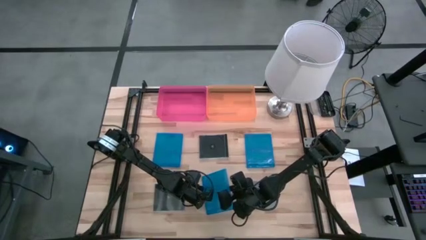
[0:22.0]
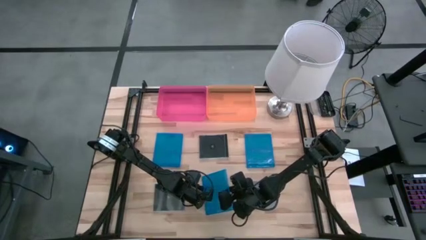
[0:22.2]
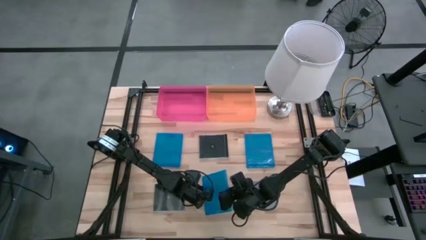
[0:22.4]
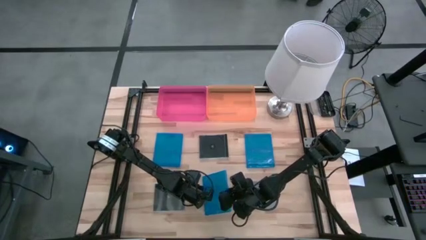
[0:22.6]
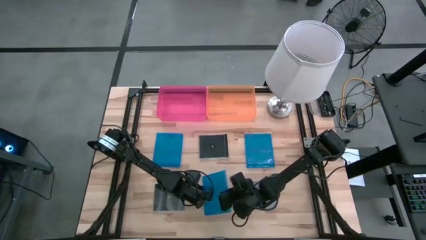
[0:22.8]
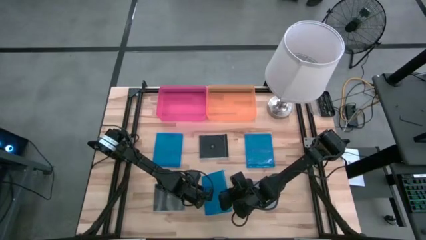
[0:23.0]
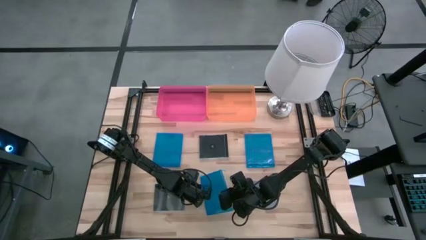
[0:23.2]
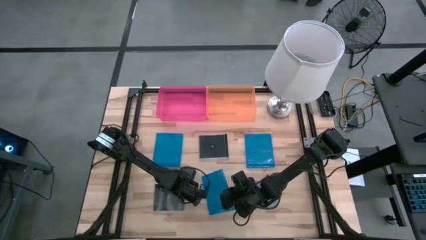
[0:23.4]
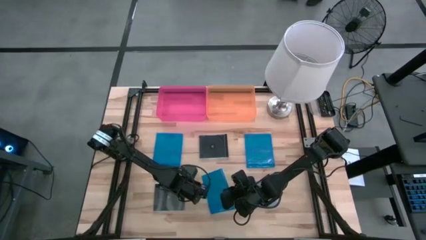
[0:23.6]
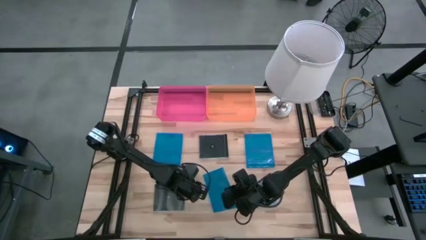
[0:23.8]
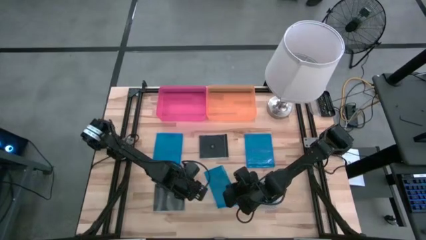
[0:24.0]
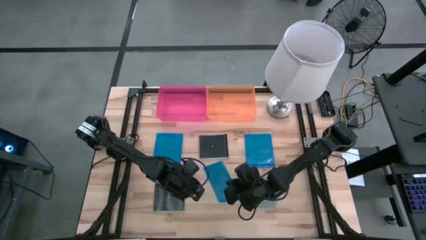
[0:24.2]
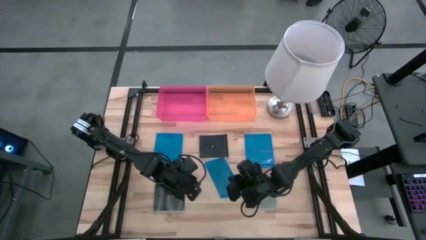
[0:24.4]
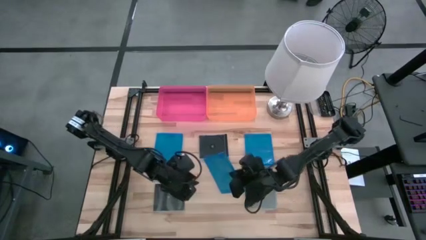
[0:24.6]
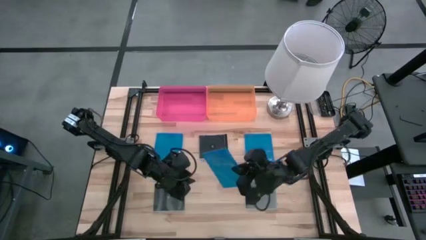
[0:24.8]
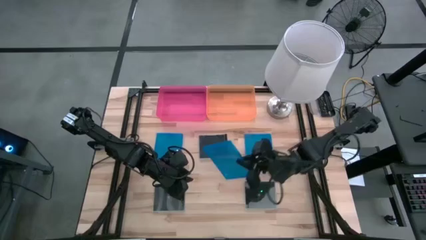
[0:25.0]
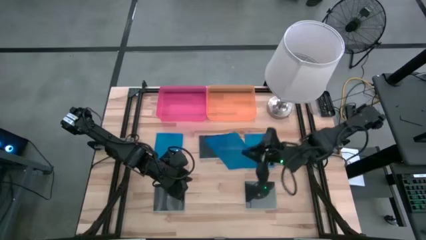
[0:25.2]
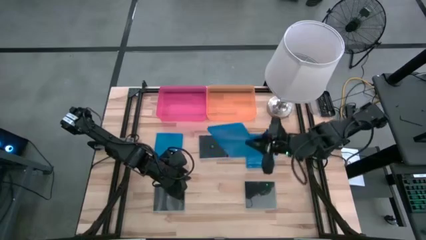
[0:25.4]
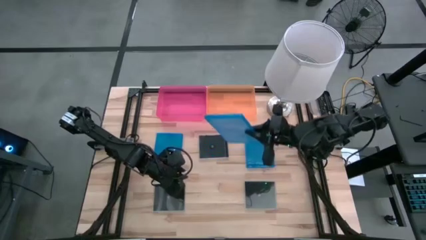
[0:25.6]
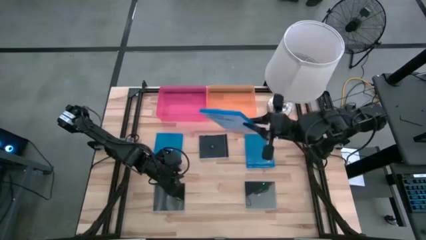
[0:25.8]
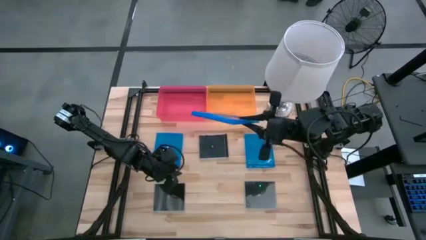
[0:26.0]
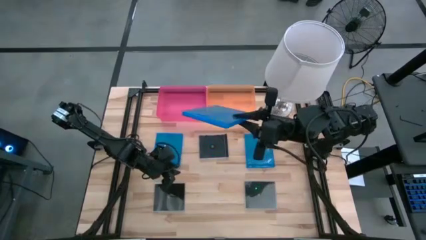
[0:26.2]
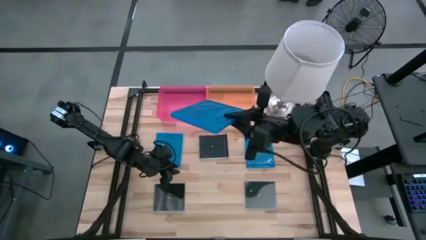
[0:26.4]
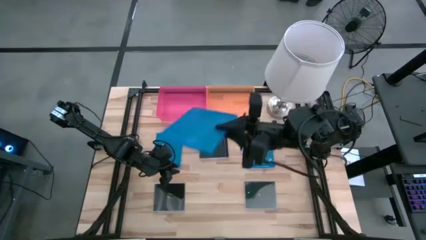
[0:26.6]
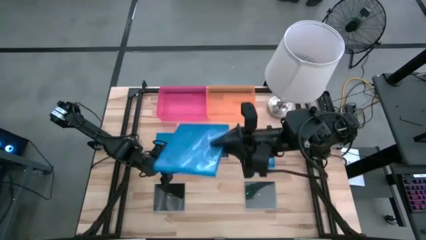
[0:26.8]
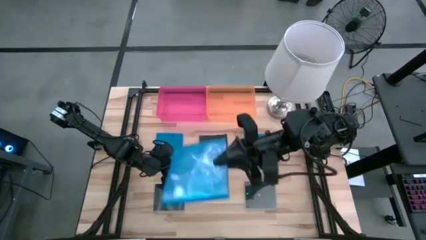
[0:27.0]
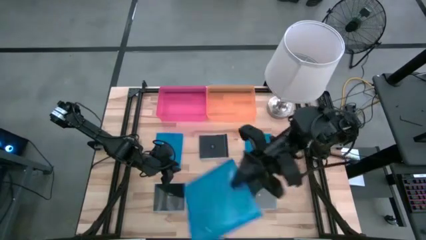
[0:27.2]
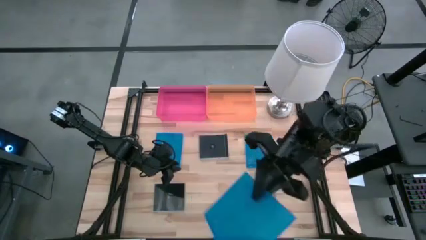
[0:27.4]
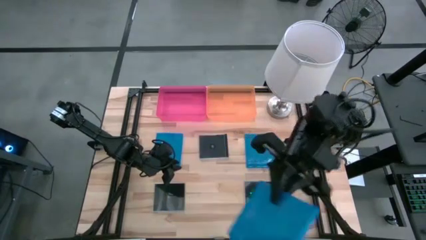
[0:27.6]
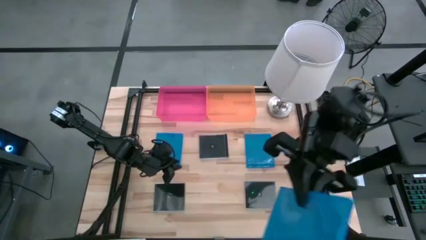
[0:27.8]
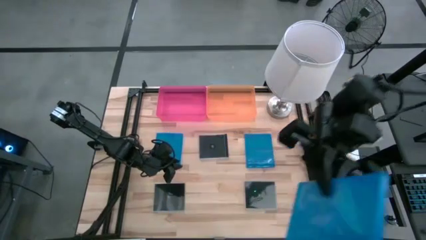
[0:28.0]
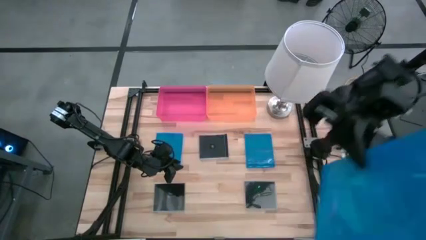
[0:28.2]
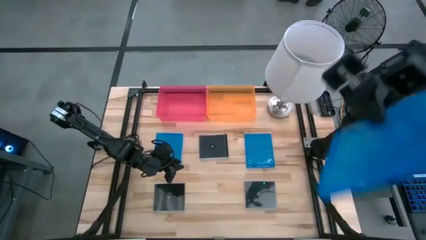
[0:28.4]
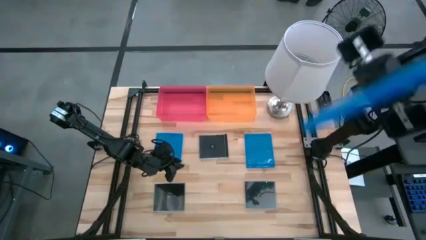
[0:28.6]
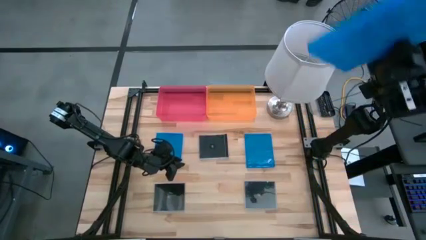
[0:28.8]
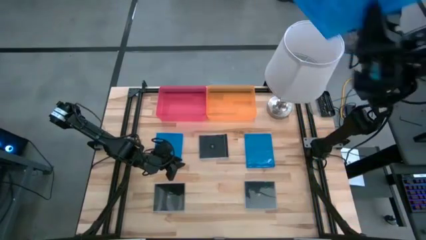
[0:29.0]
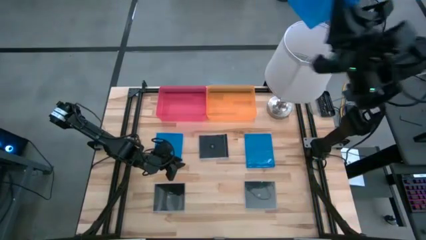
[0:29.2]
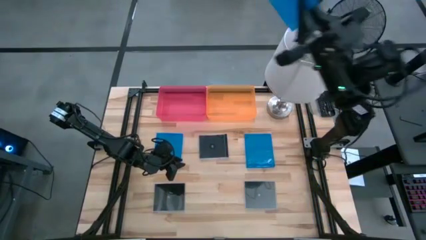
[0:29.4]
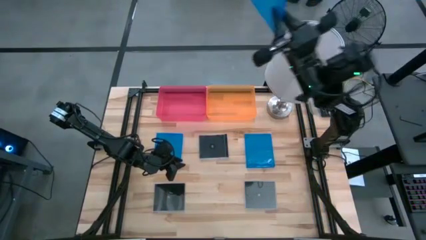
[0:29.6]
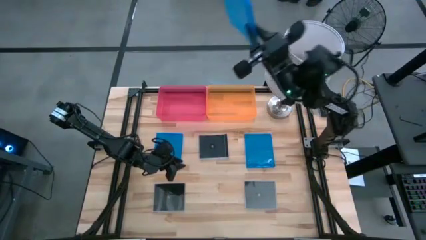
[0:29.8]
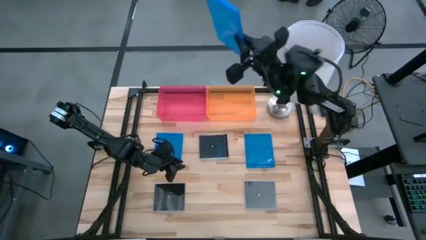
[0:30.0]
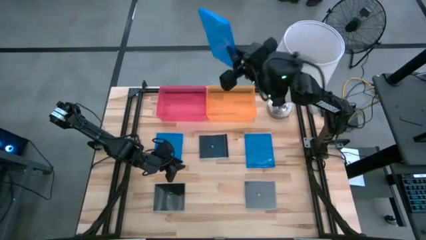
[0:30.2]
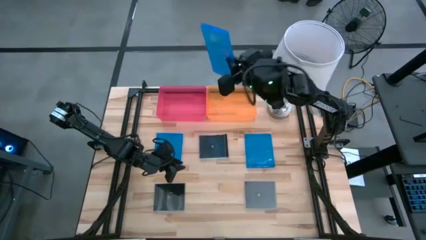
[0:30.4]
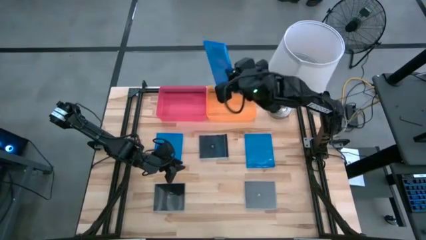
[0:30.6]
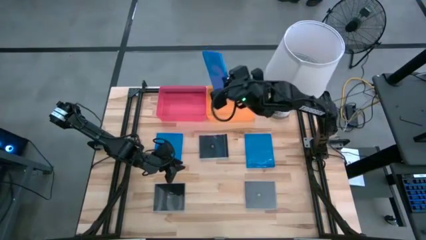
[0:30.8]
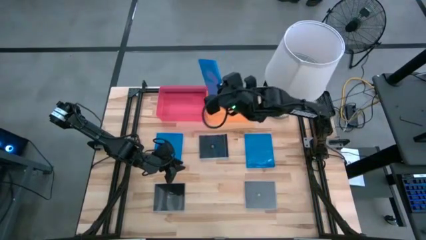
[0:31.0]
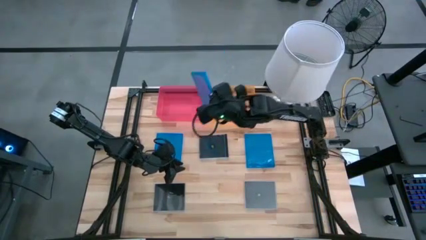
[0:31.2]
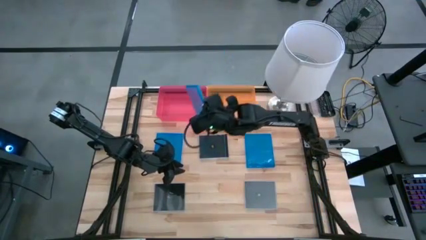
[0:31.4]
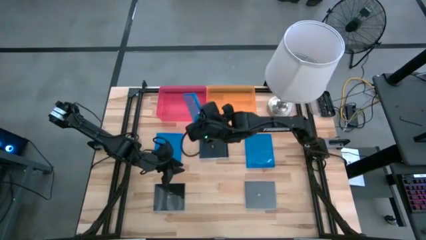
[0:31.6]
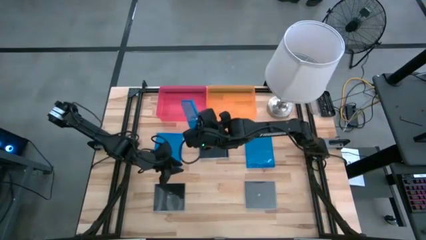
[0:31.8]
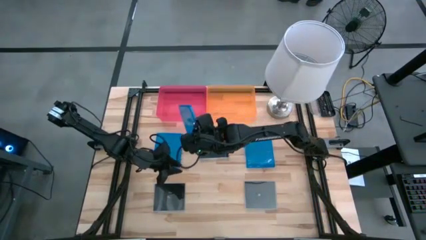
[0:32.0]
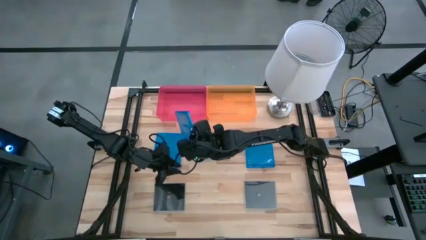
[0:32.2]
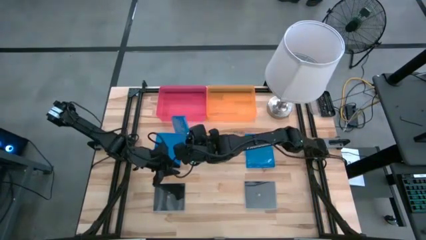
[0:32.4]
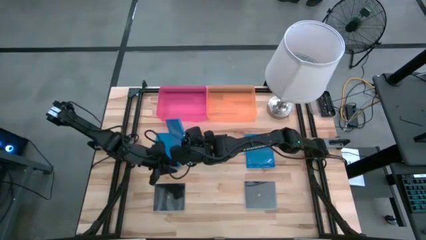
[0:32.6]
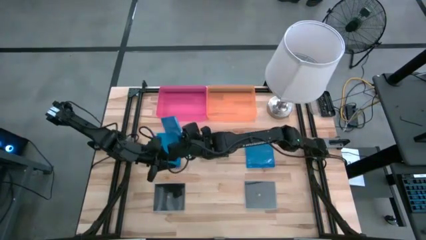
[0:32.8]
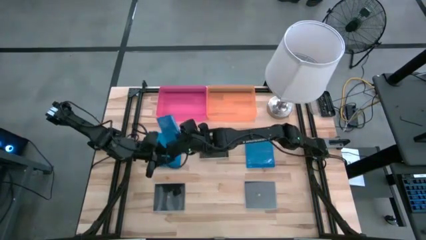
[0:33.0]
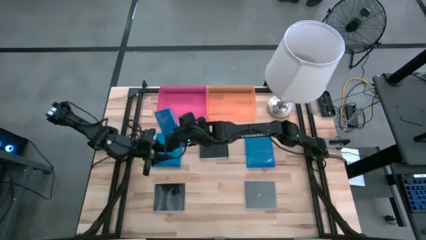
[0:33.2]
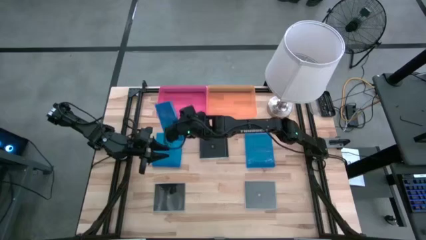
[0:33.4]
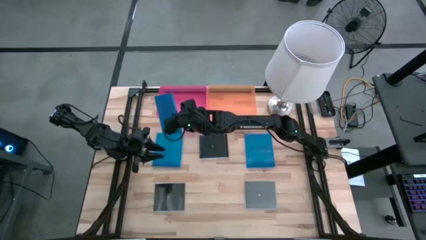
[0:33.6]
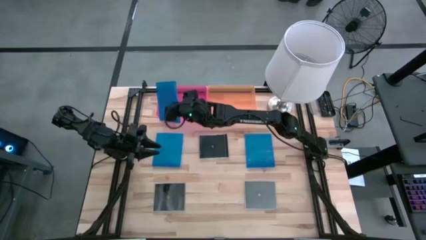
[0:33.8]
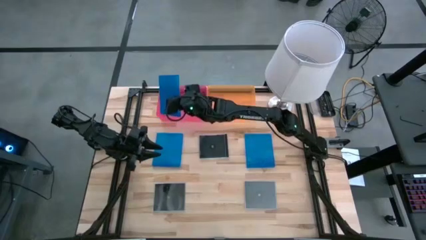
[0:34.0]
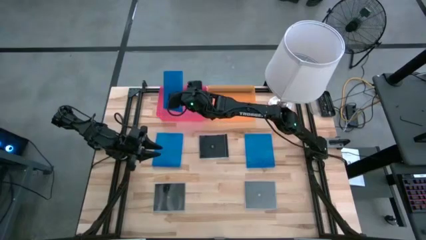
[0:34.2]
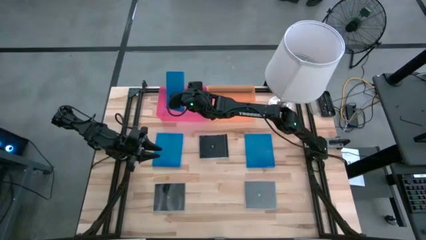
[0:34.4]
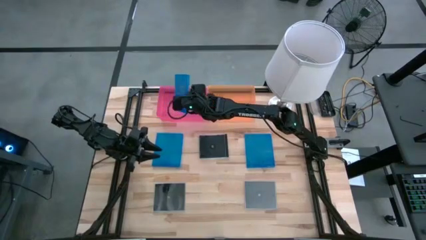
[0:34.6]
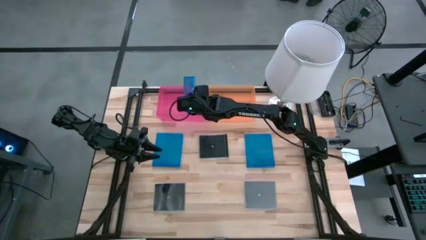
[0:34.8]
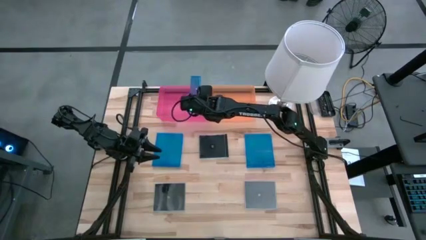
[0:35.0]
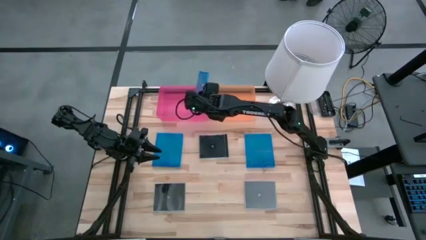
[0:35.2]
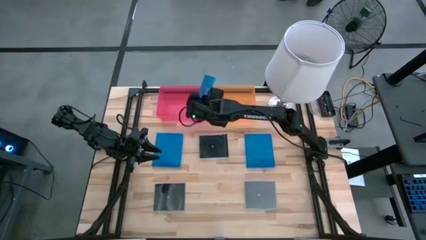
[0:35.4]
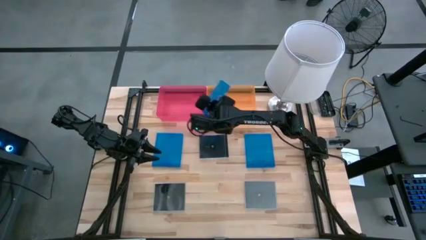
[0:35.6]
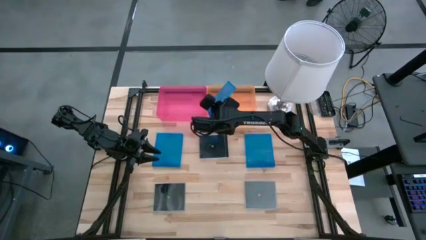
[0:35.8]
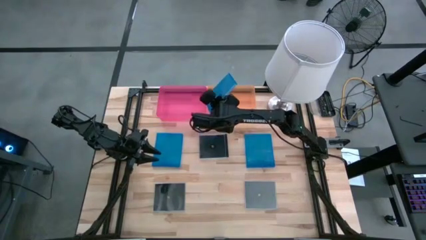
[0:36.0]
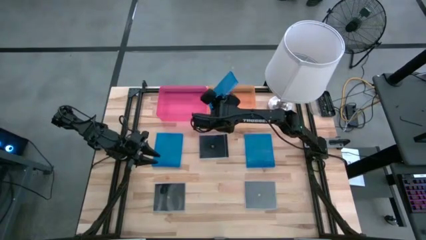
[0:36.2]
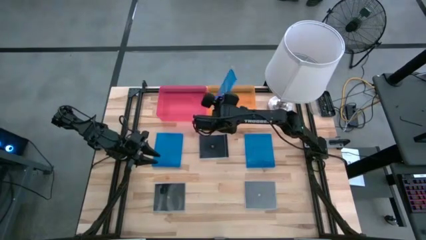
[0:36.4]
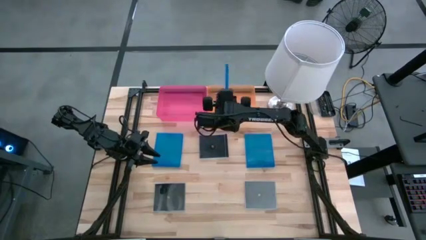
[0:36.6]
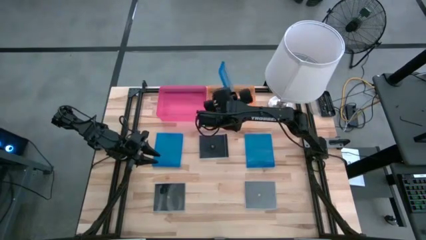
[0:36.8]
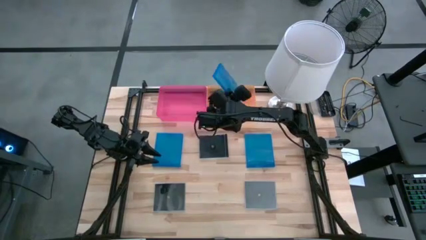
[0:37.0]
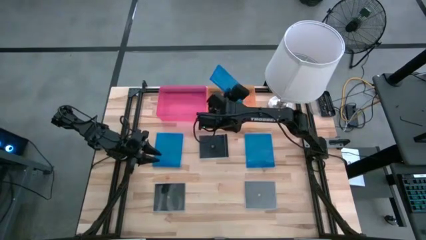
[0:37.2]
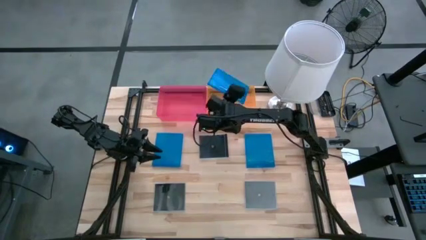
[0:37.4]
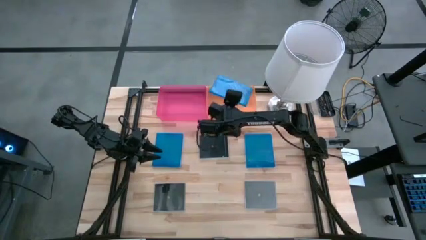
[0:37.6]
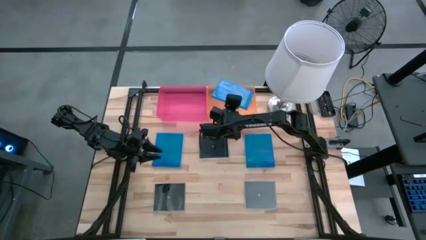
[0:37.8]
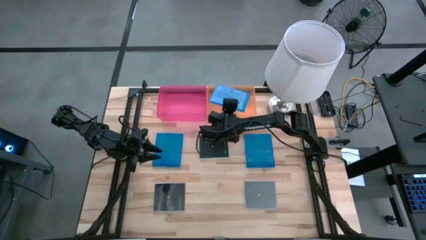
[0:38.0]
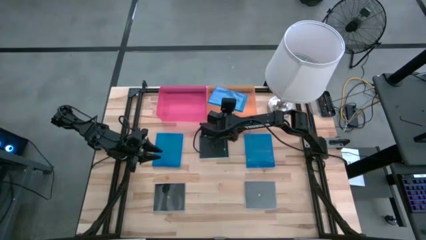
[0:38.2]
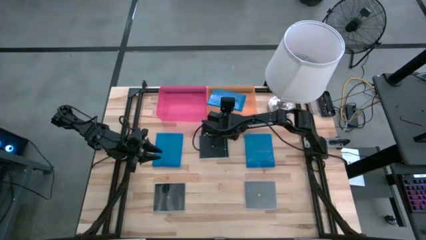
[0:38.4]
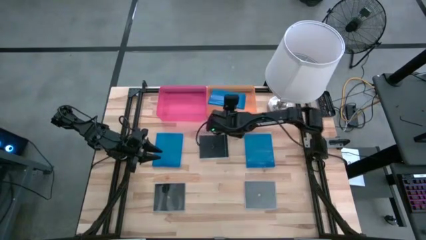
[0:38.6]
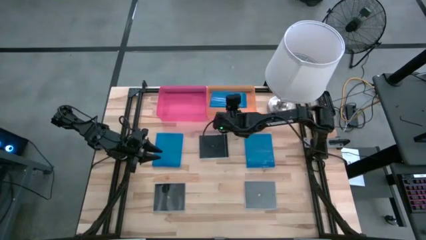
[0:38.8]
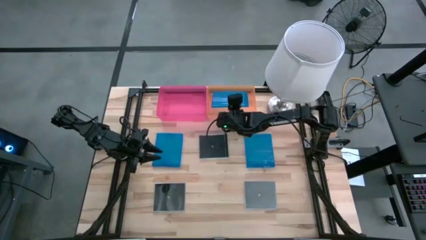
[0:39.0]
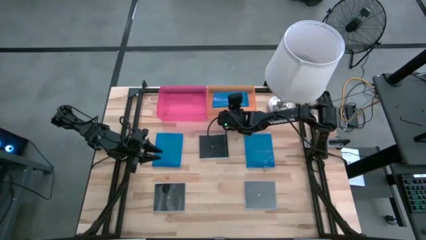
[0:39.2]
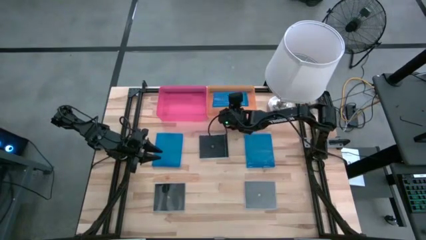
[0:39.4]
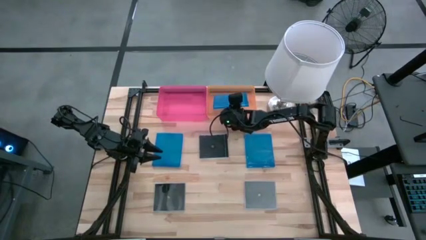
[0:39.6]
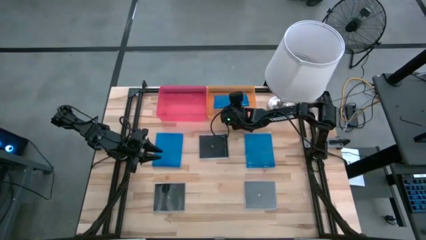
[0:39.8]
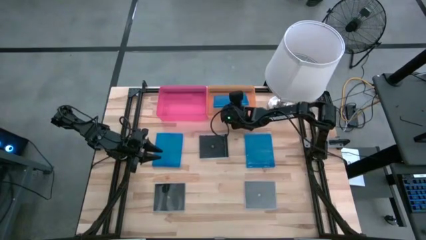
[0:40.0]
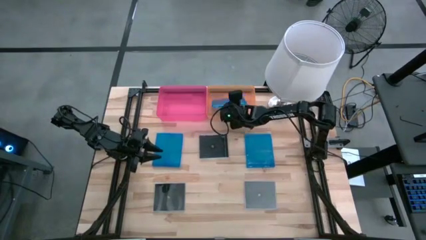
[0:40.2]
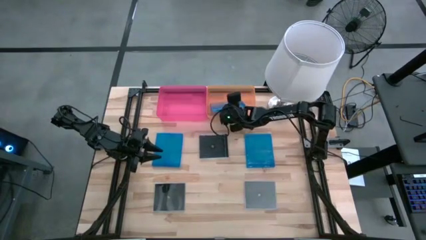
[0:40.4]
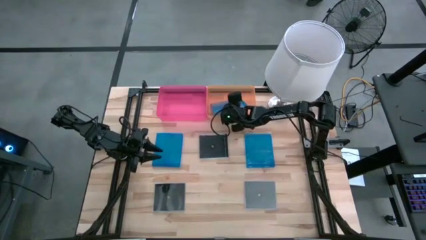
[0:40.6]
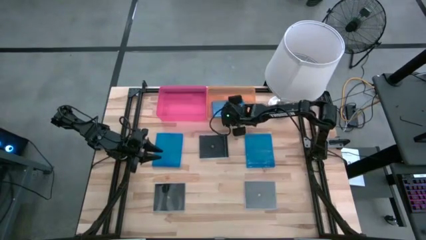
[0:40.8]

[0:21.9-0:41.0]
Task: Pick & place jewel cases by type
Put the bottom blue CD case into the orange bin
